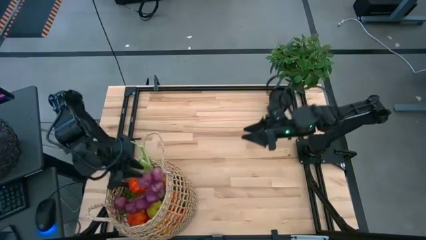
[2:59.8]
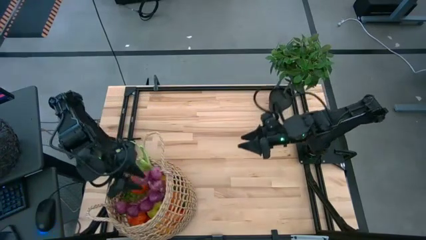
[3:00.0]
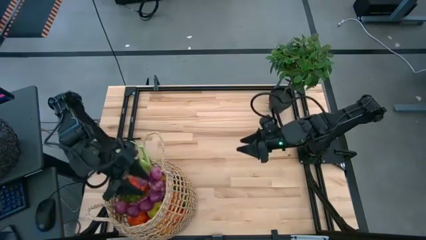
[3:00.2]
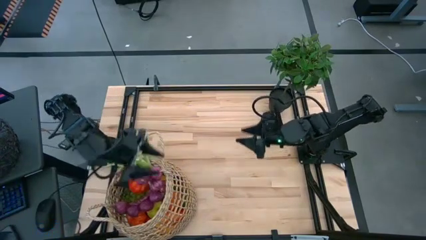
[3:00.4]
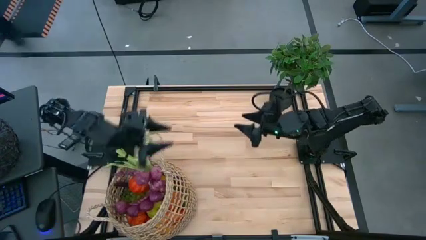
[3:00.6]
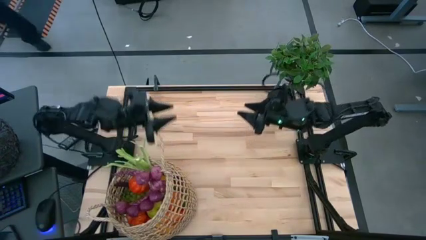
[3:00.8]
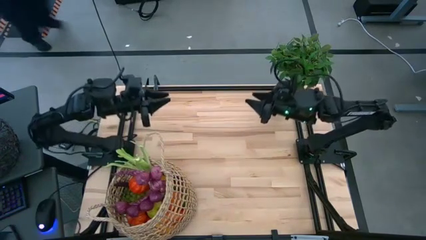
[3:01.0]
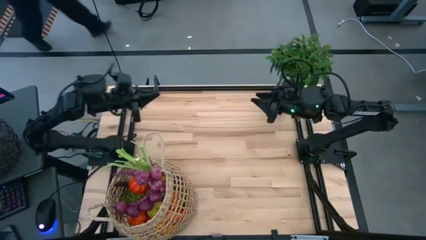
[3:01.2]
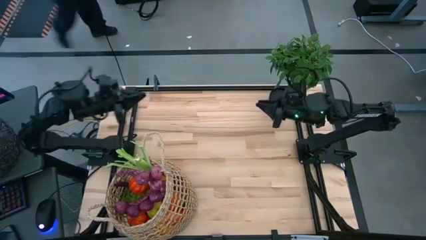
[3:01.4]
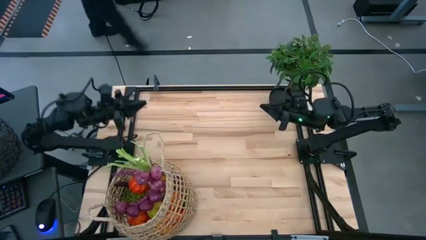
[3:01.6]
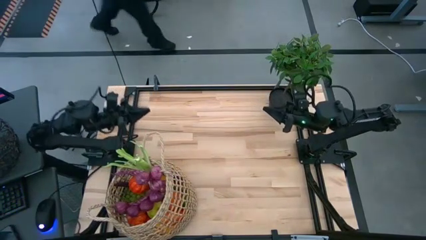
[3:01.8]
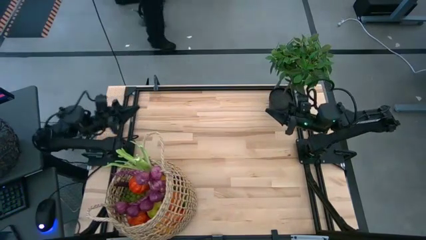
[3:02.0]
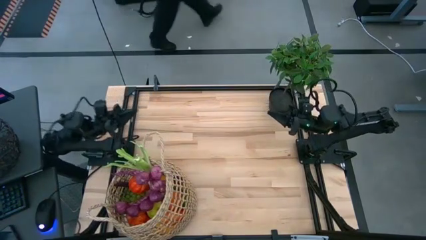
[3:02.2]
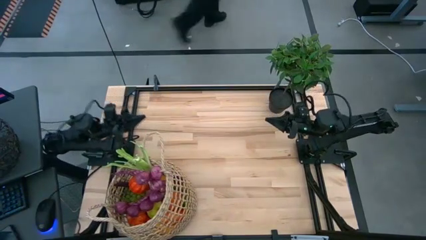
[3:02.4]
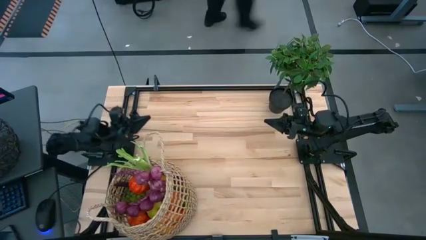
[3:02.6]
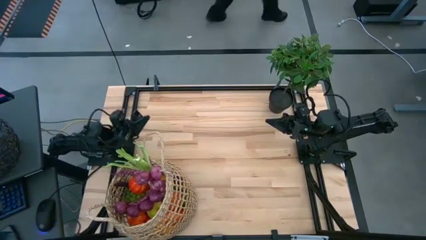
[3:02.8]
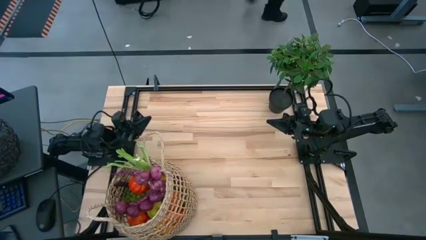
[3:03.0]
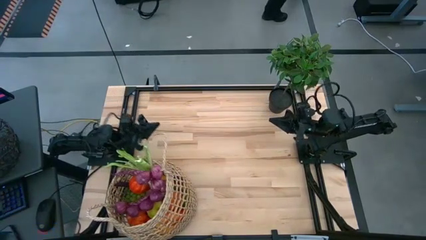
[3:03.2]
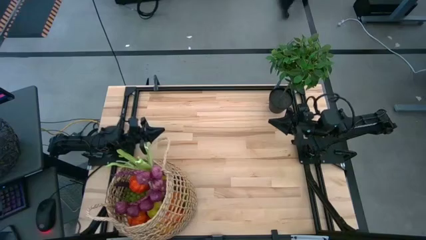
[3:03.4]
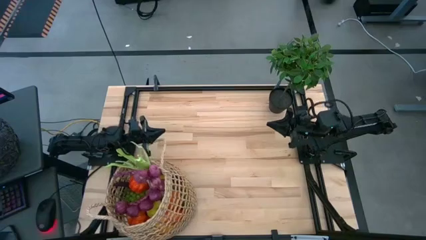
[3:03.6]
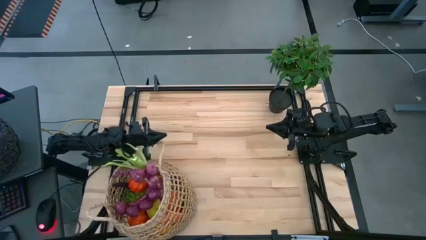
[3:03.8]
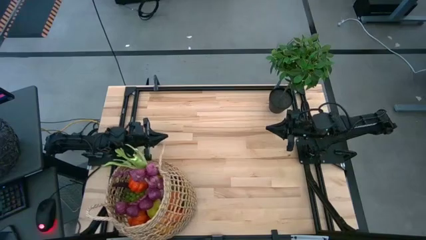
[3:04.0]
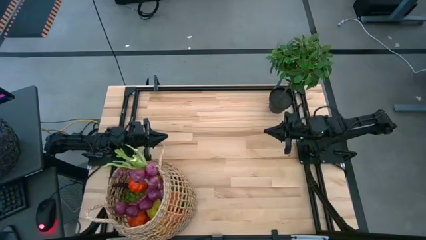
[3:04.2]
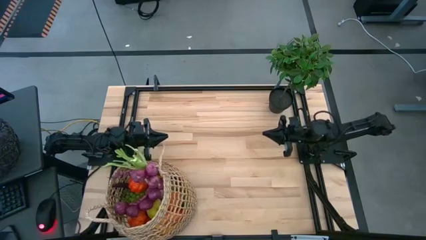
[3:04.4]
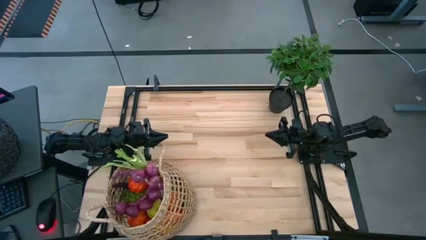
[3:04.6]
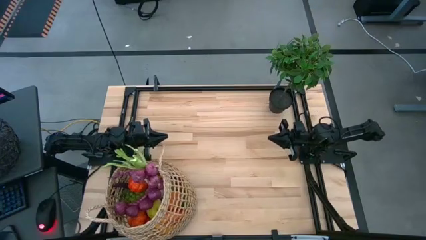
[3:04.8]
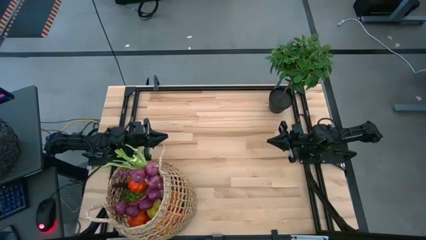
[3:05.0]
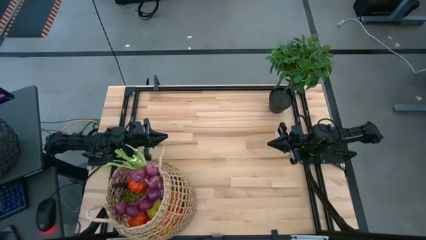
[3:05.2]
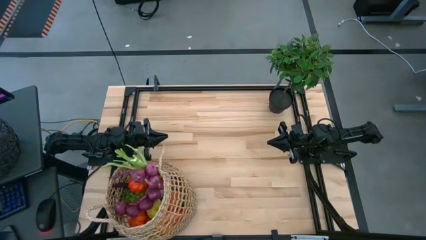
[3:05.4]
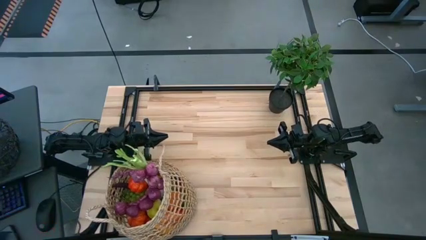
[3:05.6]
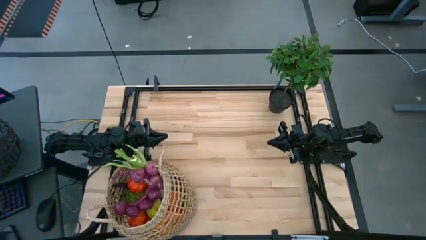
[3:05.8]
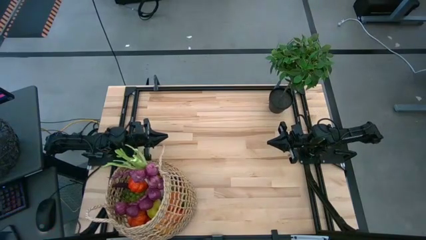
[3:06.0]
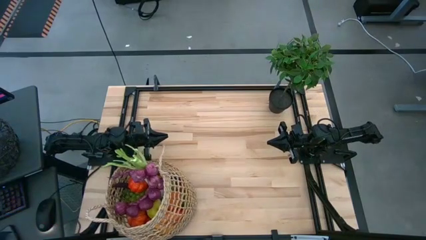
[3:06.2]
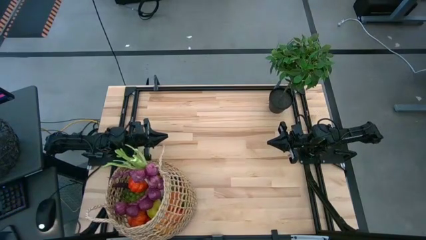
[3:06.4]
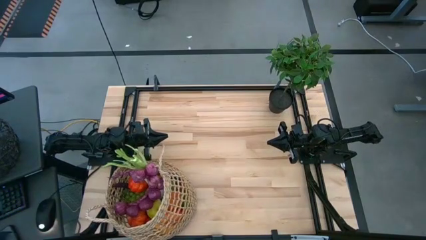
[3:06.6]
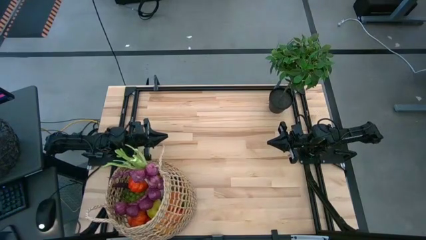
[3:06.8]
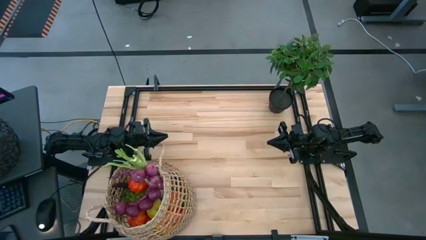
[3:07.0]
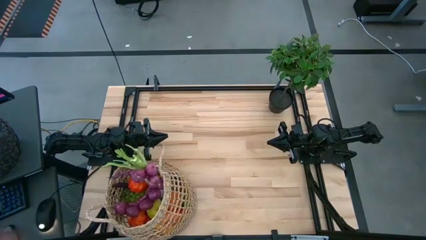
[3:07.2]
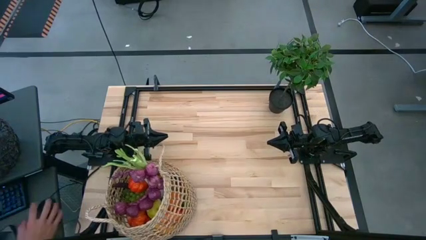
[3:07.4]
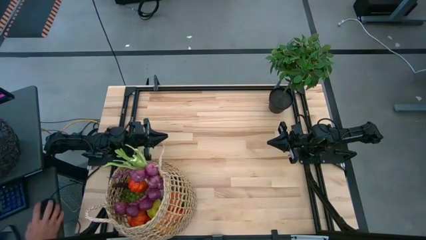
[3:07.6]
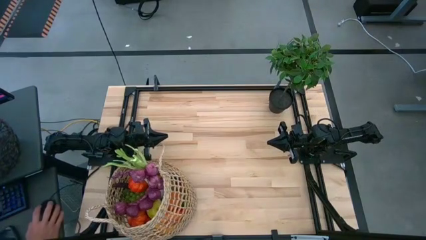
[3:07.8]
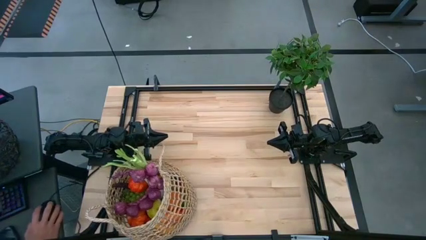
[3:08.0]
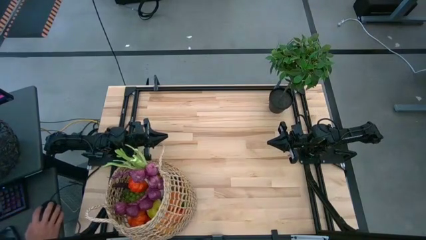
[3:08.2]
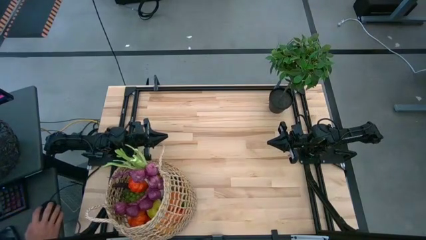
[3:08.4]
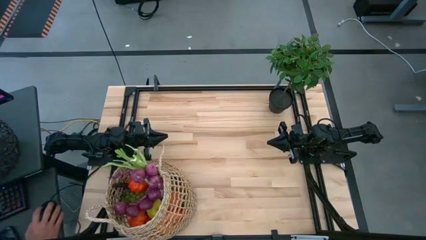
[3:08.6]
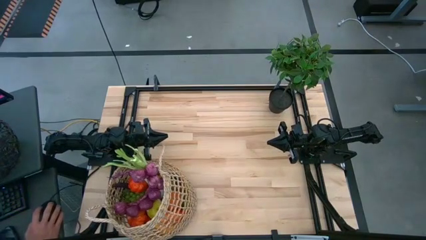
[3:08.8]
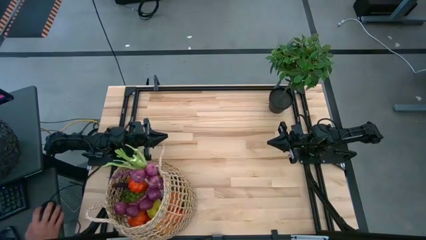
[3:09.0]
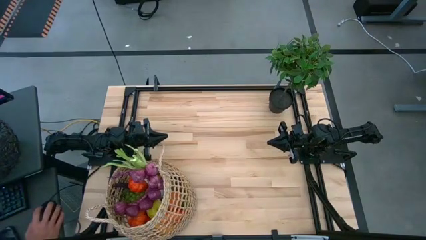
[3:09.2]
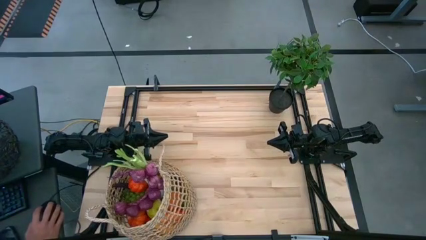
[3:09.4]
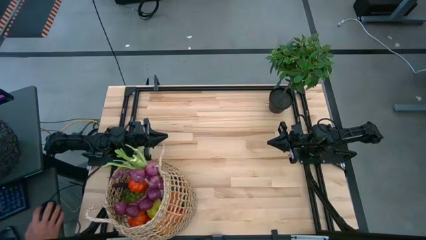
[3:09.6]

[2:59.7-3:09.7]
Task: Build produce basket
Return to Home Position

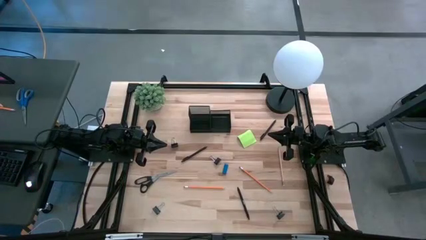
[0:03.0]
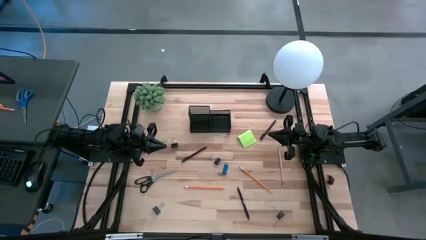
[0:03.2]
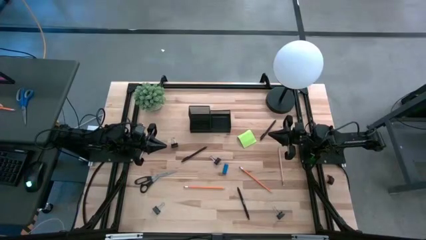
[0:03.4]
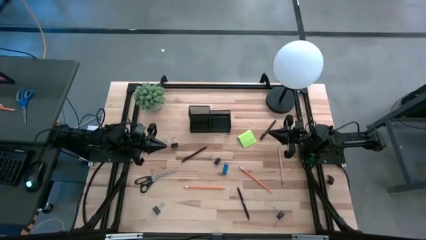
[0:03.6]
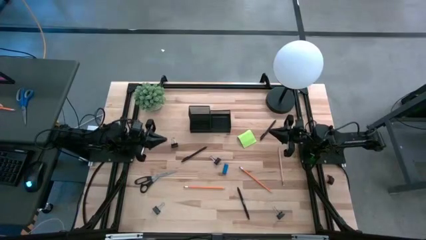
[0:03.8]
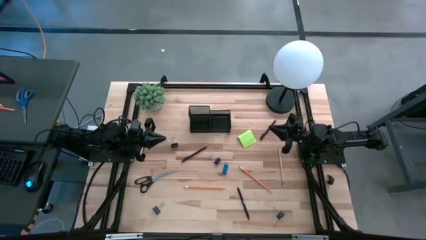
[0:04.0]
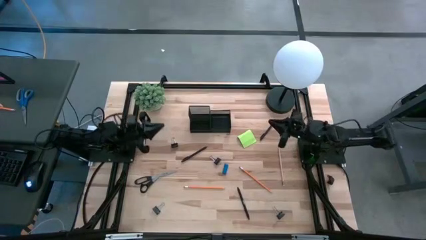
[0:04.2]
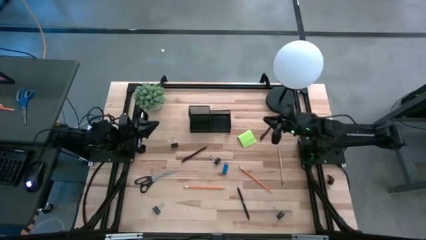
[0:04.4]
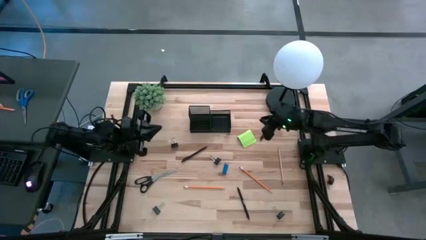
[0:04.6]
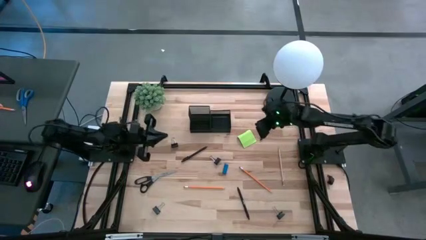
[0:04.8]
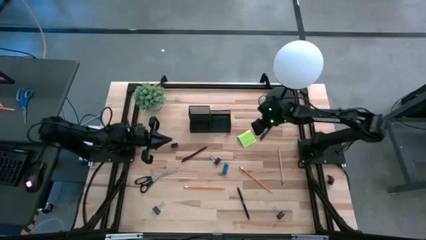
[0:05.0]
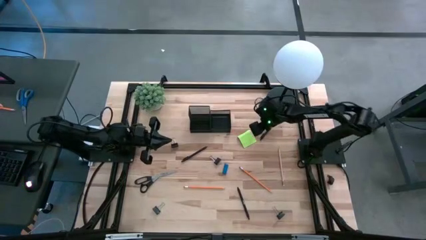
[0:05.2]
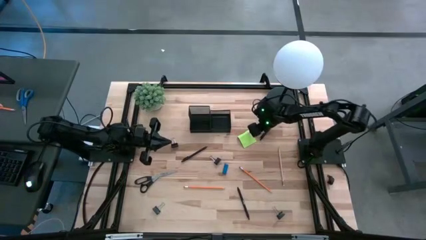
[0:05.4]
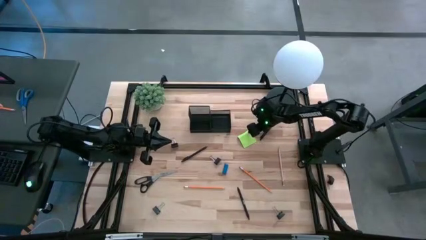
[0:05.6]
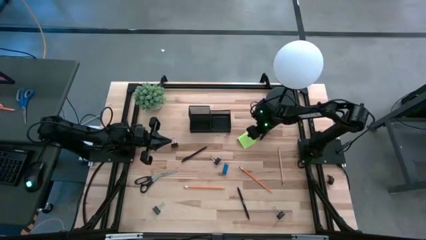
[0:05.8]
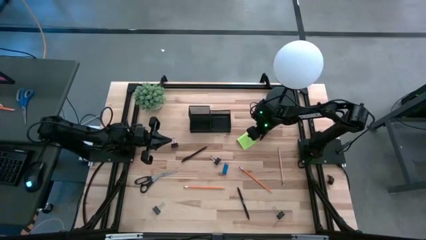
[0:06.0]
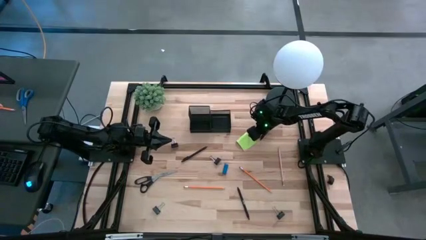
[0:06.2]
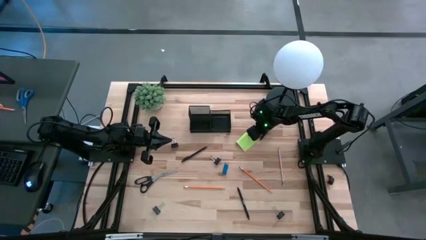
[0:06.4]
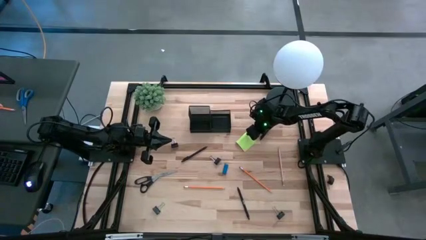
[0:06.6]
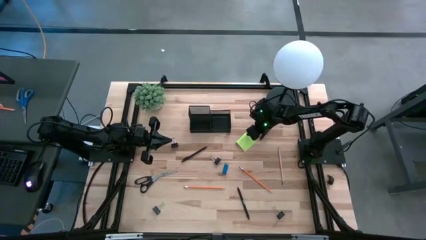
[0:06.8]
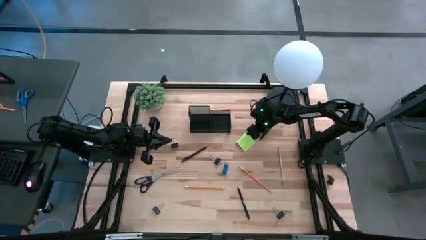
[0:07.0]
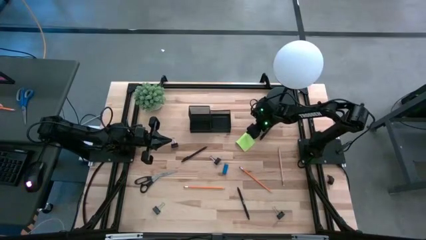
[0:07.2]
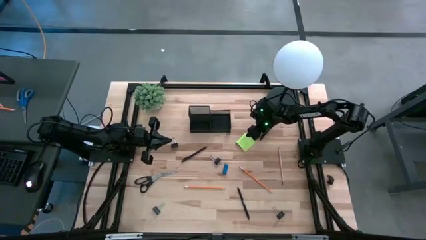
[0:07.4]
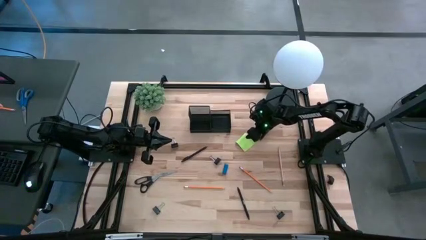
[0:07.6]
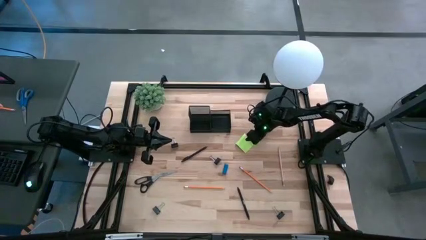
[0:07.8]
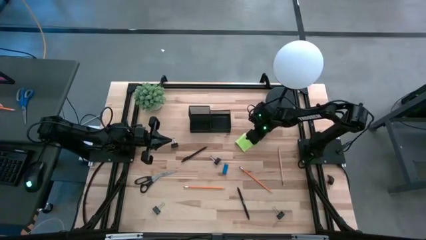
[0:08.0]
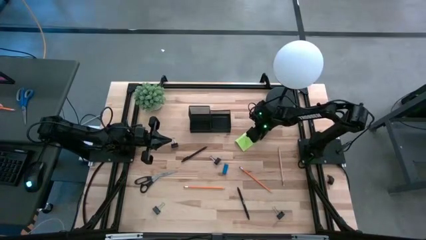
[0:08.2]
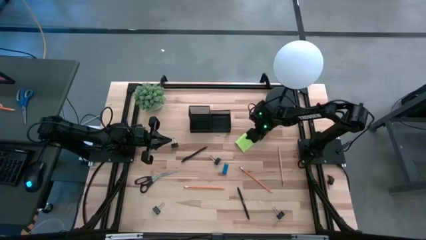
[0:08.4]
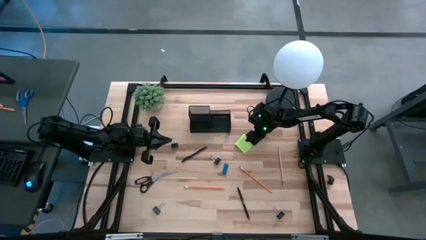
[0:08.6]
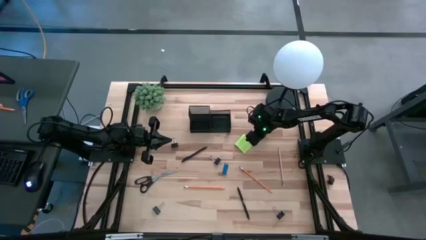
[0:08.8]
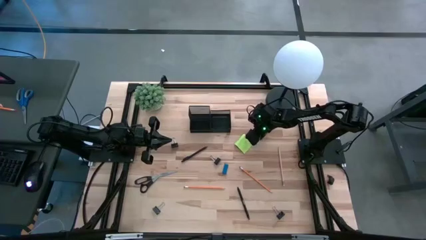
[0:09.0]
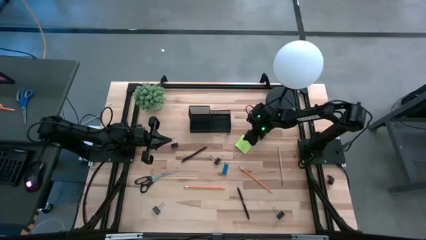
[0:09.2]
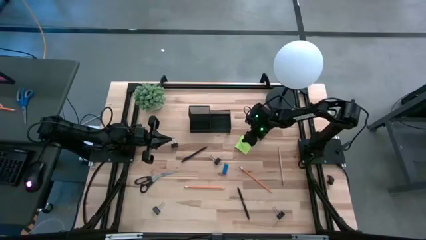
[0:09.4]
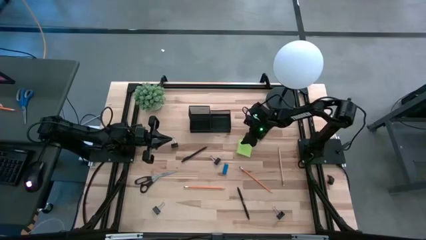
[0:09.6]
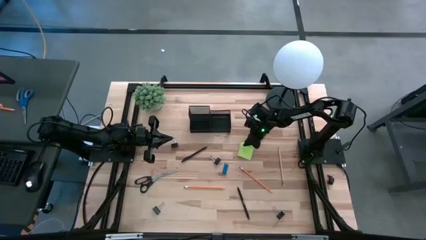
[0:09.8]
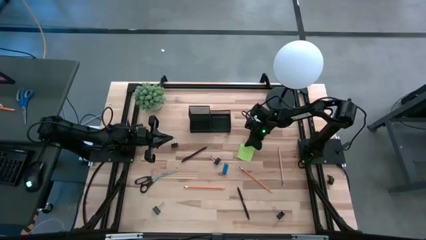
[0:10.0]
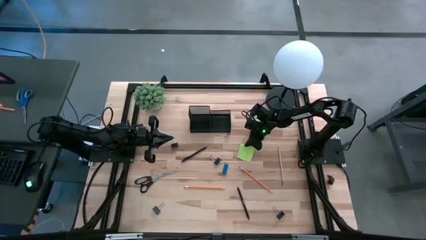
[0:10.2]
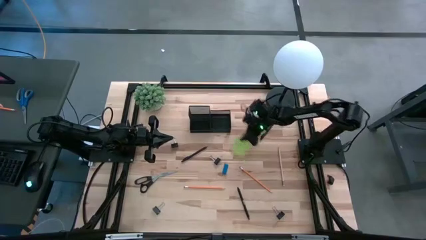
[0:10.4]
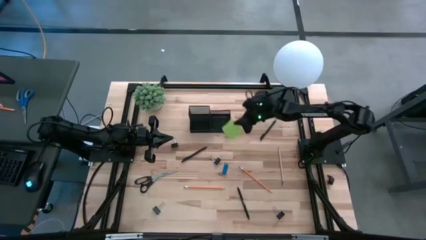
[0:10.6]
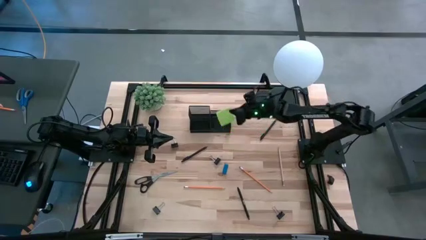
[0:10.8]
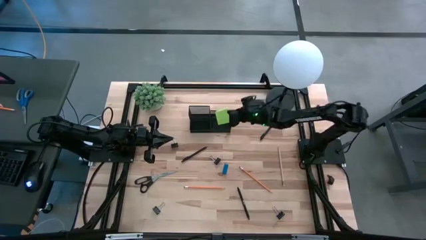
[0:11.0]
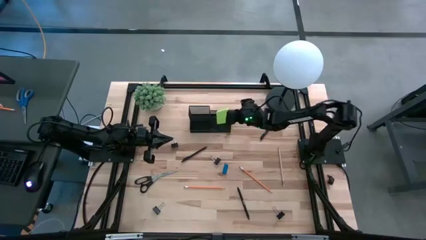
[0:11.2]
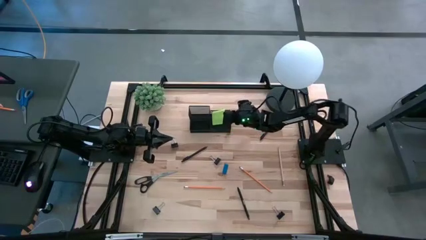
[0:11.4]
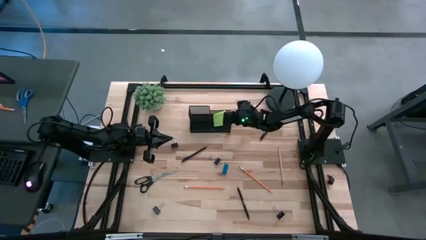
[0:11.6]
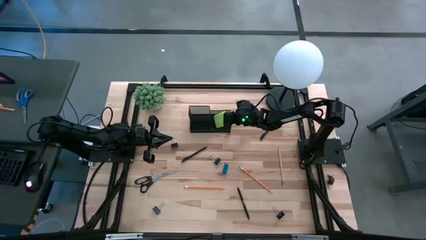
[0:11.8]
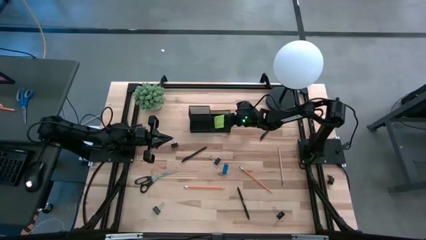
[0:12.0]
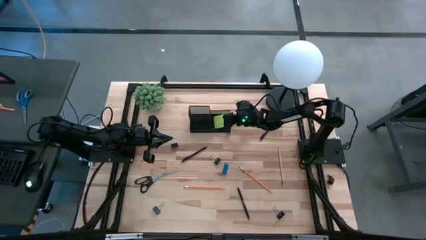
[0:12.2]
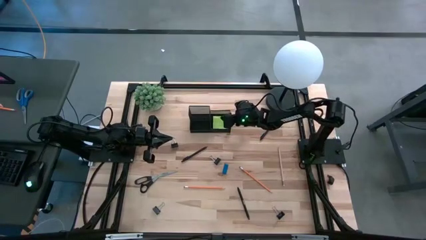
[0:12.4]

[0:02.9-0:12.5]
Task: Pick and place office supplies into organizer
Put the sticky notes into the organizer bin
